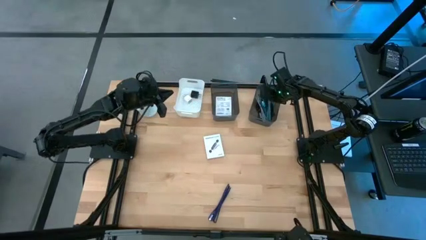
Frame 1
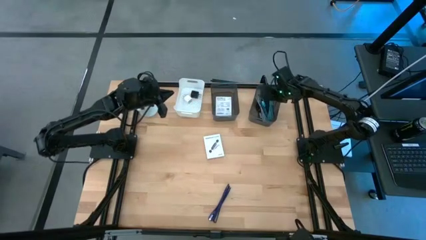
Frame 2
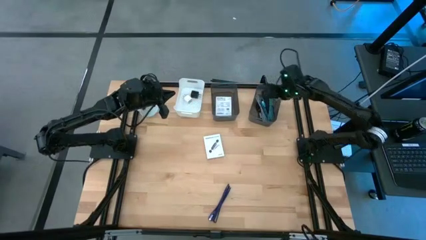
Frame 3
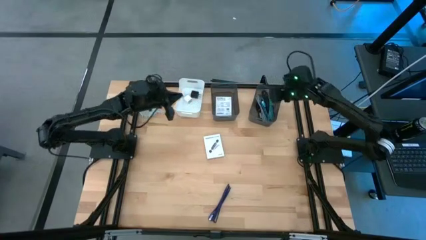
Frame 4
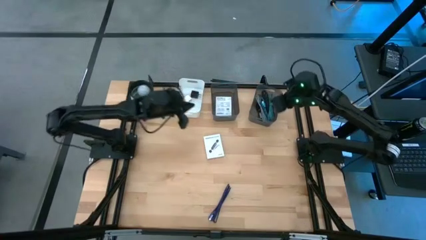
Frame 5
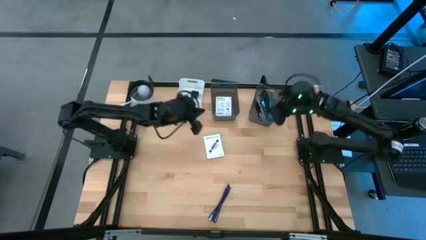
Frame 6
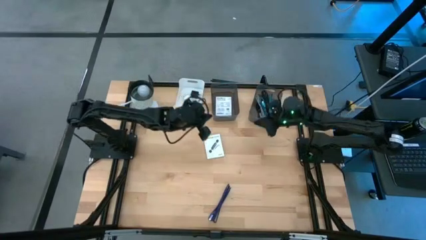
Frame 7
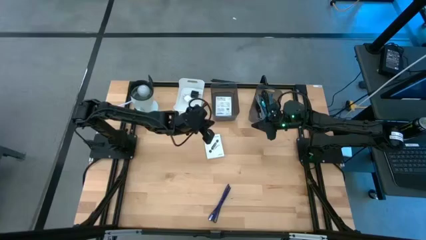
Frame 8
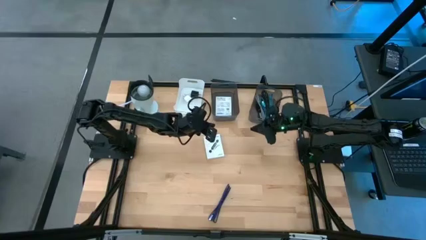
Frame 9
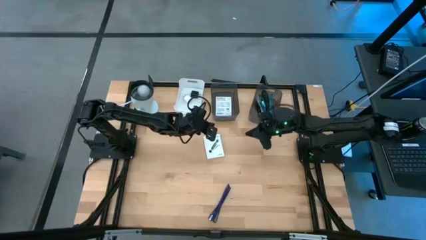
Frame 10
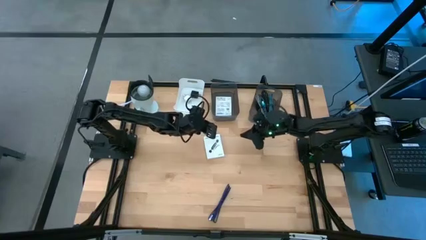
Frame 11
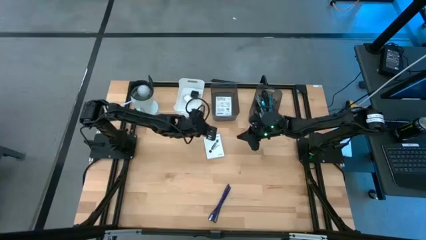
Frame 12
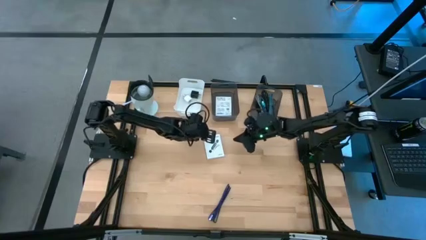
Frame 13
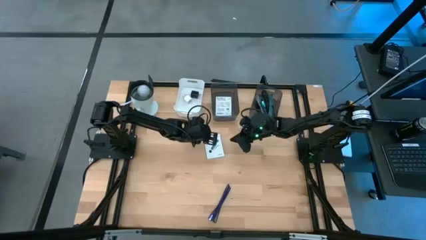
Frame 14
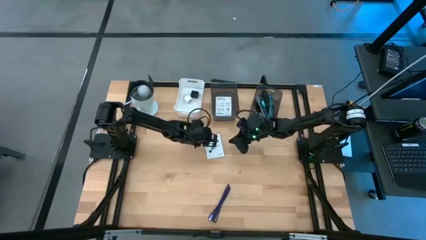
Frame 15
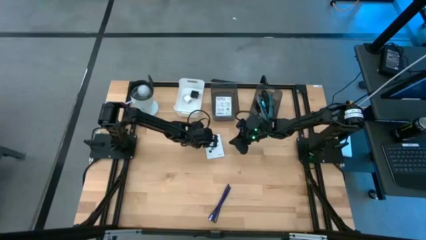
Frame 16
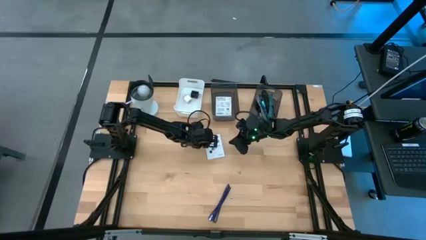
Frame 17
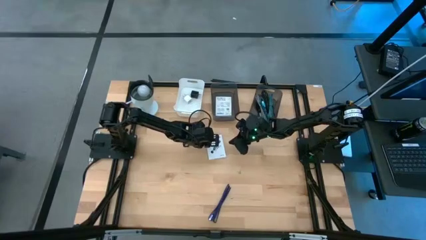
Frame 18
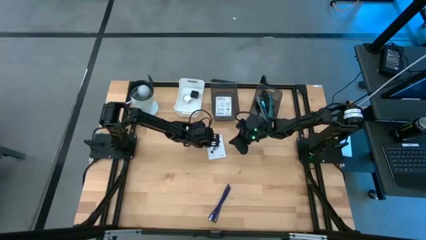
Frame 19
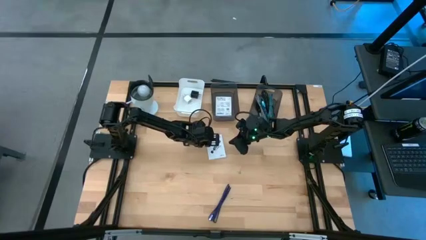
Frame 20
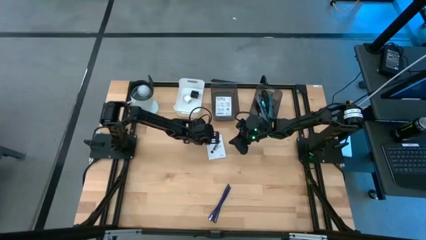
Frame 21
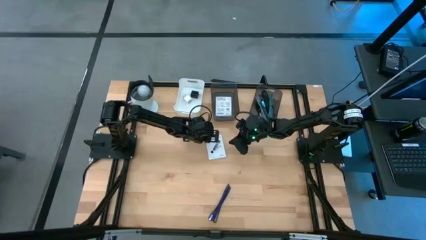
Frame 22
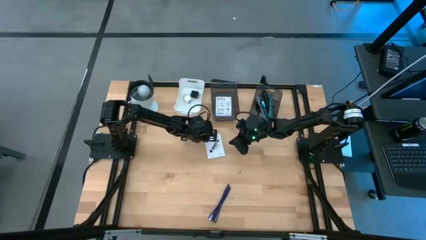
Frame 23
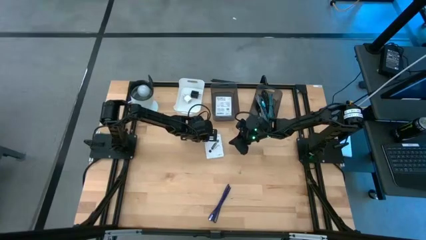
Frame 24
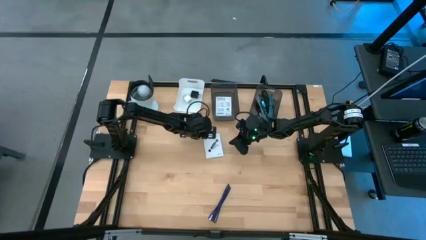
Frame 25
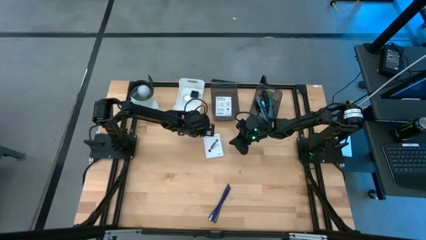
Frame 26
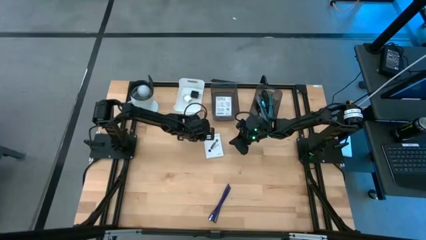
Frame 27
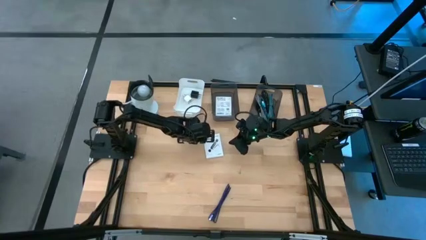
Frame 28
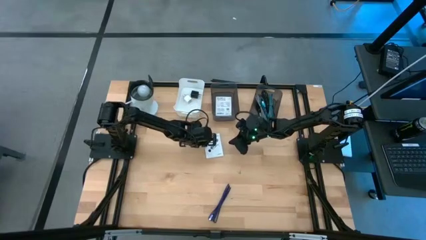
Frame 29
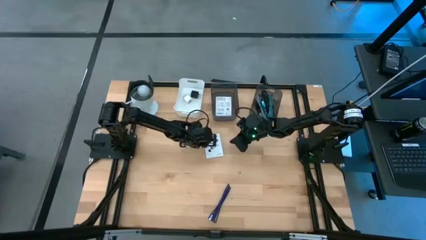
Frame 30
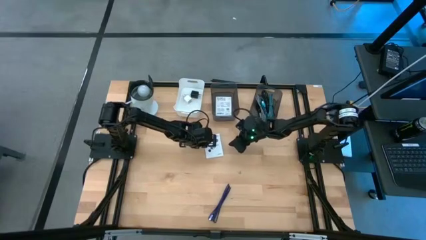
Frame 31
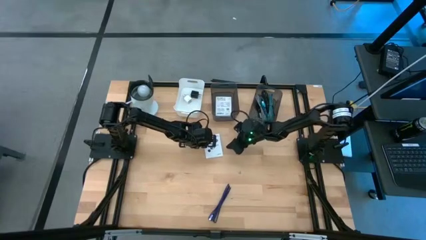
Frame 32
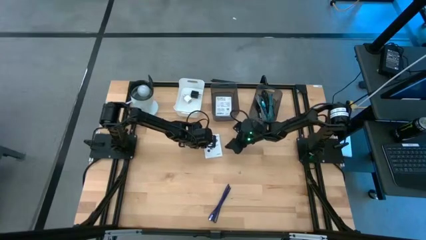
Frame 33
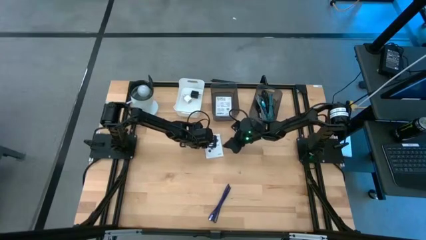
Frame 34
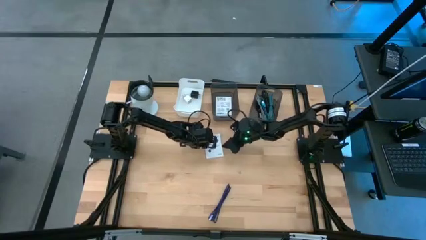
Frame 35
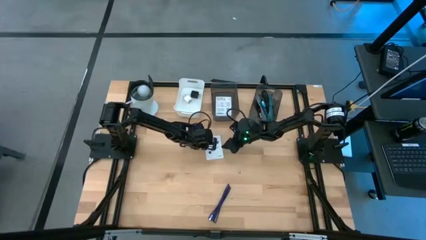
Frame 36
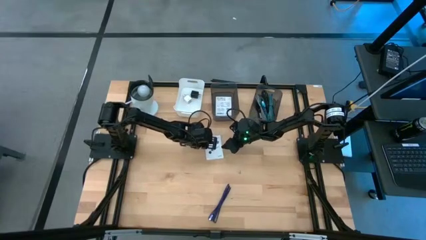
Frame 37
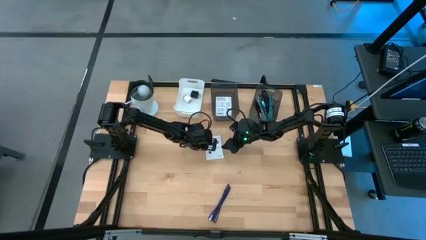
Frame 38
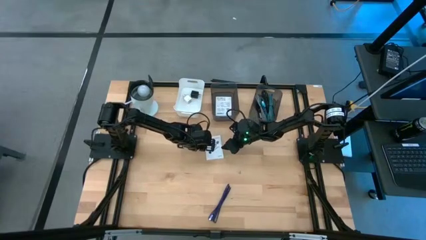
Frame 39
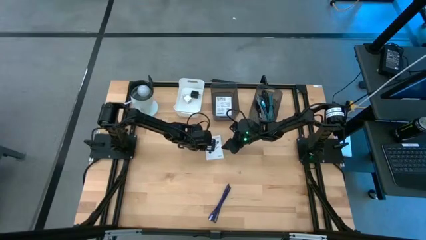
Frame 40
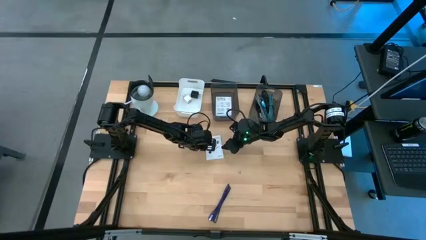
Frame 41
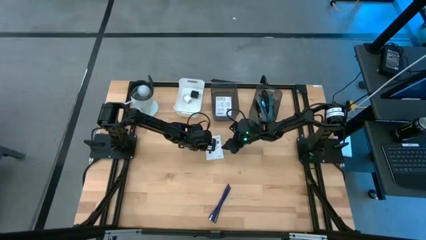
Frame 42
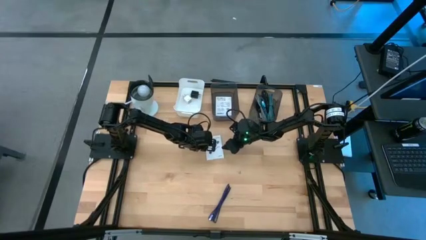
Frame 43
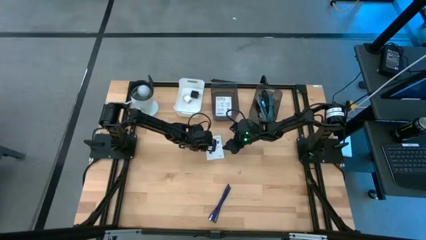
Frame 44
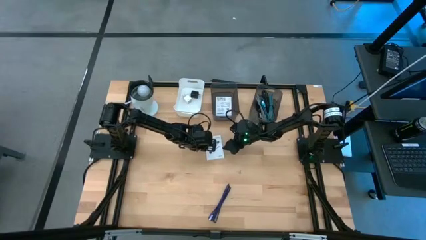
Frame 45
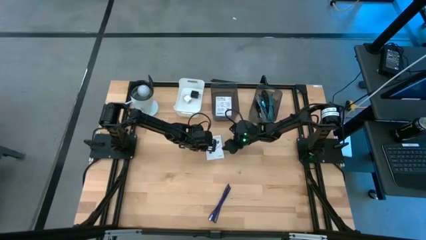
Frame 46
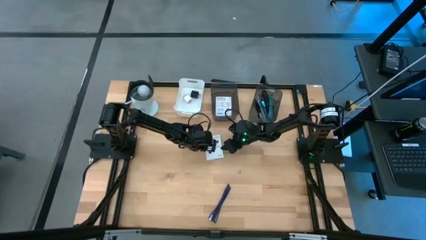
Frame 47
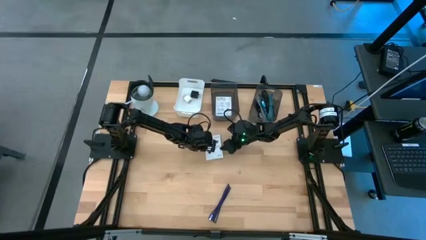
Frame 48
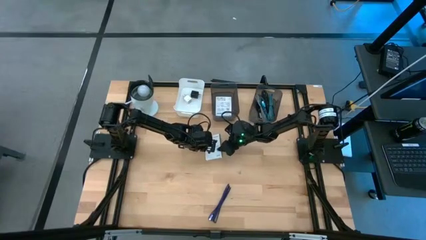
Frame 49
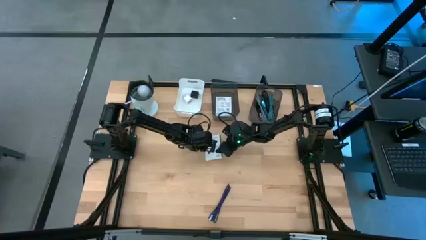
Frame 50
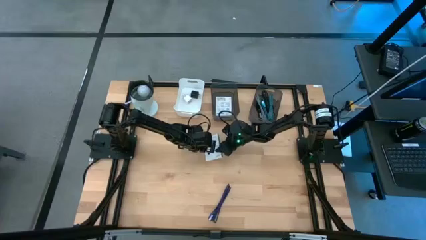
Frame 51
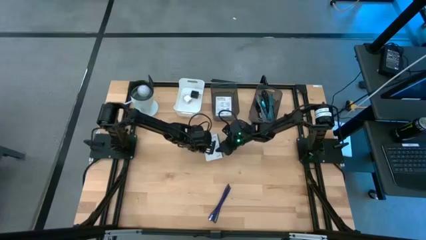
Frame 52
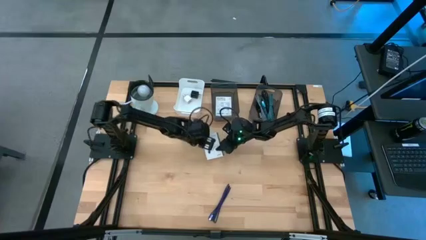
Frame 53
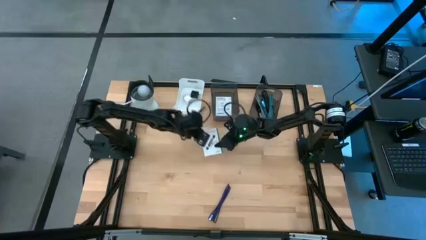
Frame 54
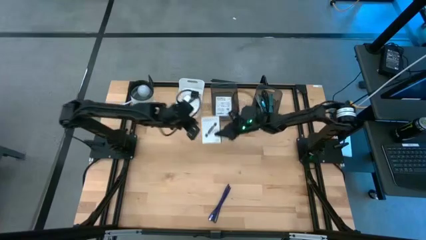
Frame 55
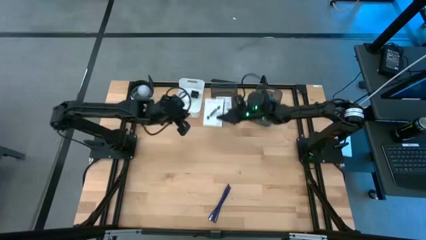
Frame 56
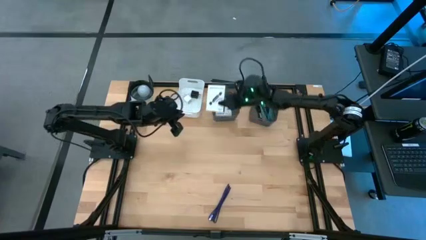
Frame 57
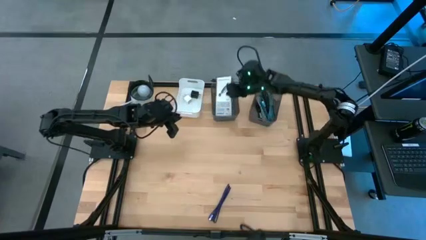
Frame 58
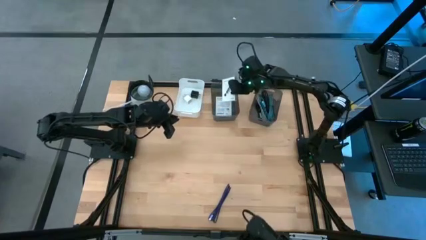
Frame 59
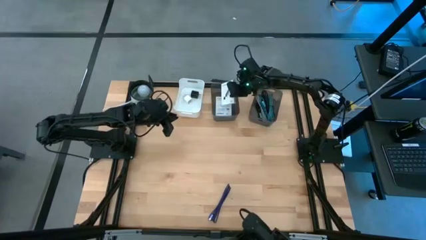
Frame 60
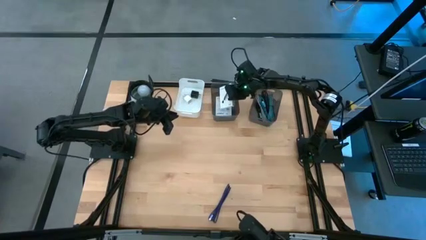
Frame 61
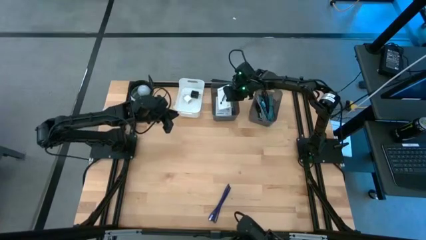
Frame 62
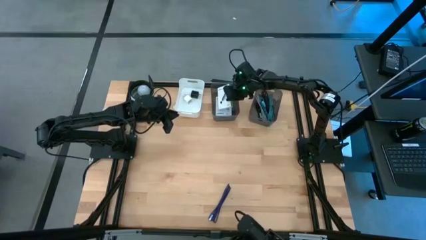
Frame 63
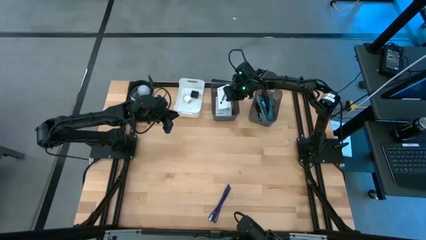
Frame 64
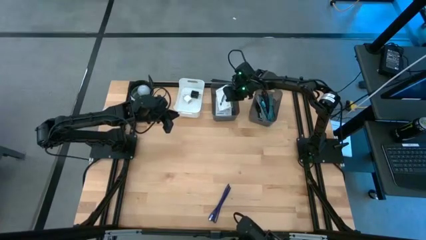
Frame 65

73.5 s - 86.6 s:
Task: Pick and place items into bin
Put the white card reader box into the left black bin

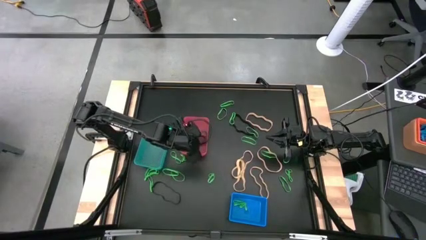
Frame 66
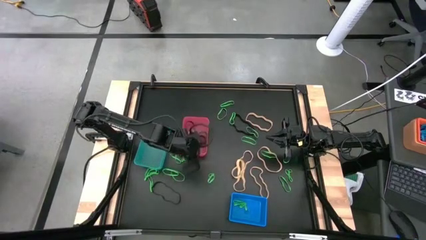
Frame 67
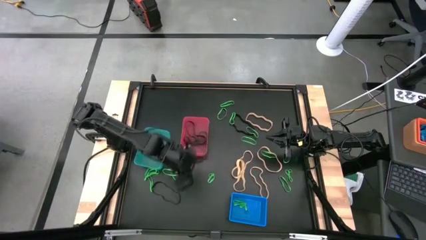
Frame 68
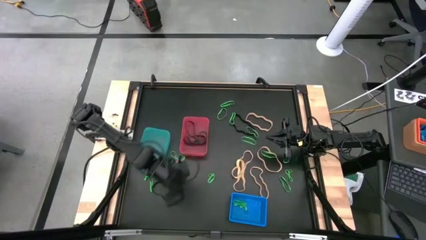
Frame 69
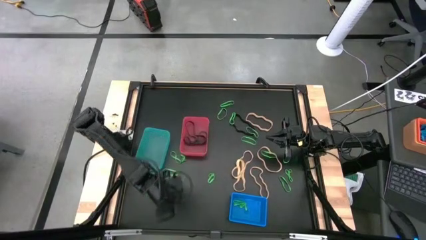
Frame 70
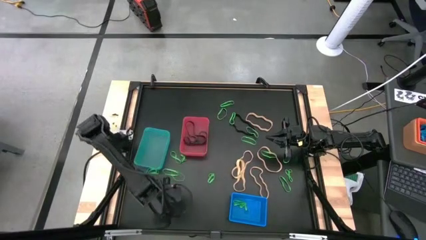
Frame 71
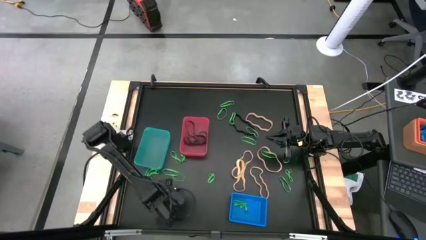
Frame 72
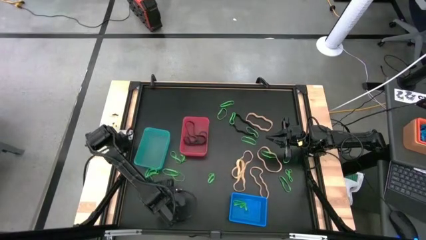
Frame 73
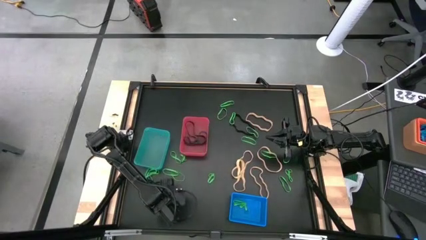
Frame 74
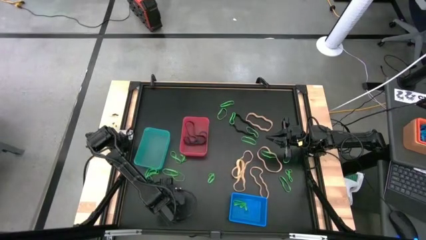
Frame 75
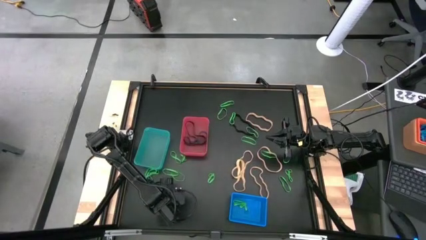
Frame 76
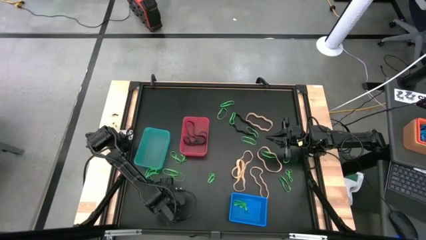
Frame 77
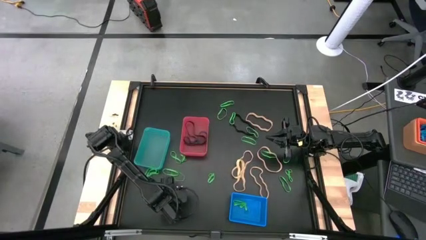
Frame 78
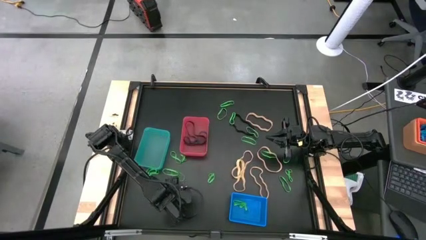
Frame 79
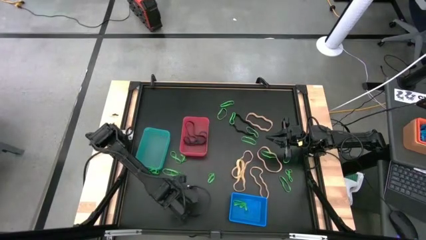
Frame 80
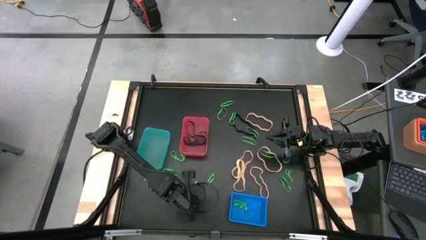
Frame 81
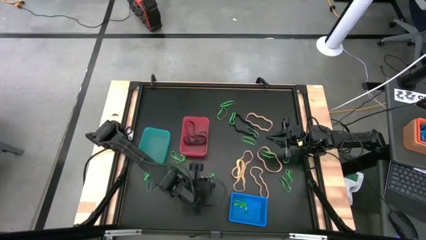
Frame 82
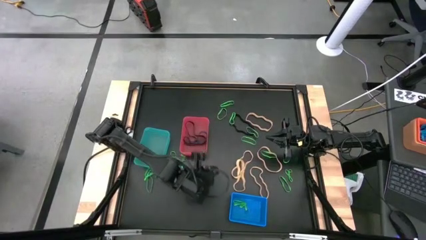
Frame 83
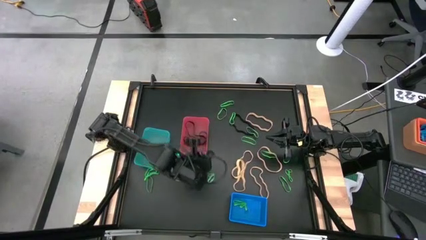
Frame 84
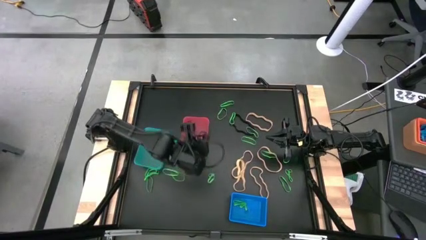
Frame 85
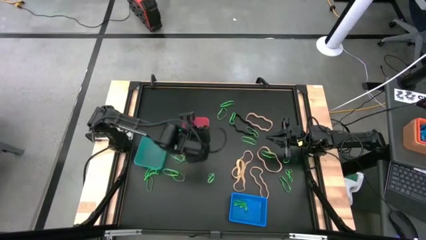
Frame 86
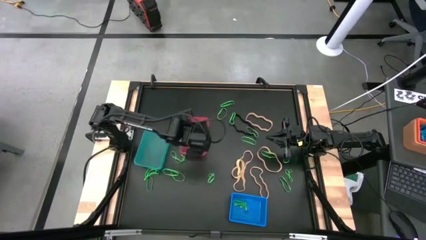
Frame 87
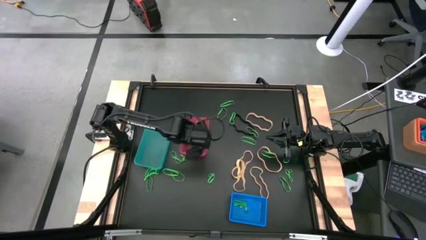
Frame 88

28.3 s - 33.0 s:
Task: Sort rubber bands into baskets
Put the black rubber band into the pink bin
